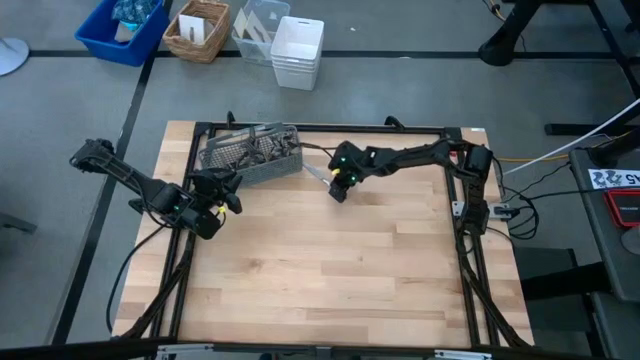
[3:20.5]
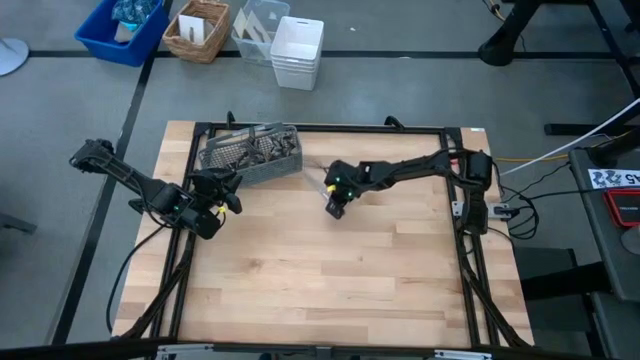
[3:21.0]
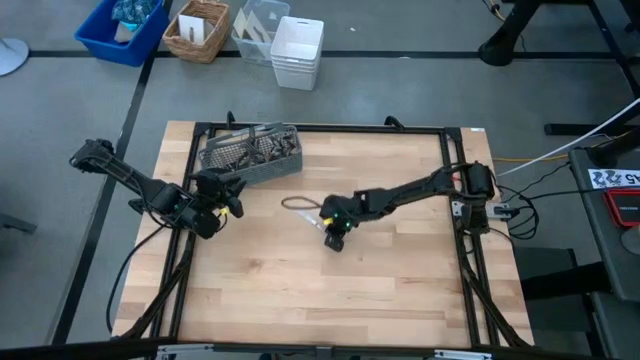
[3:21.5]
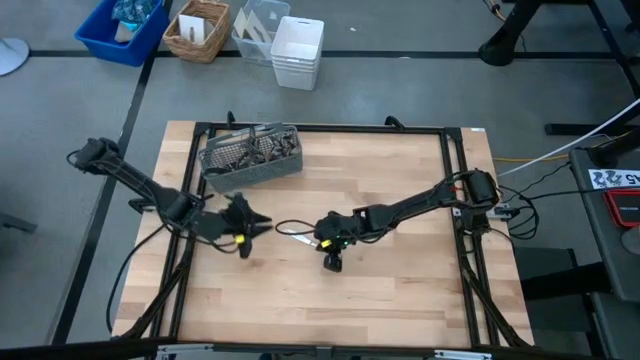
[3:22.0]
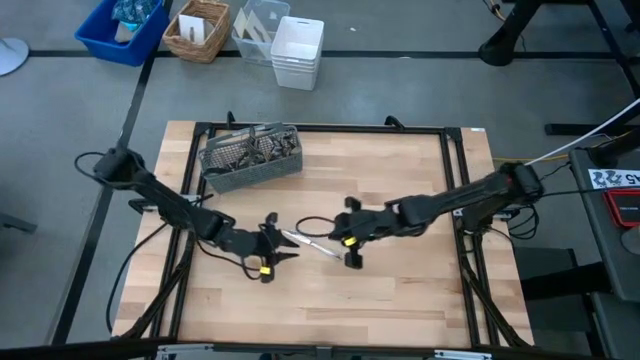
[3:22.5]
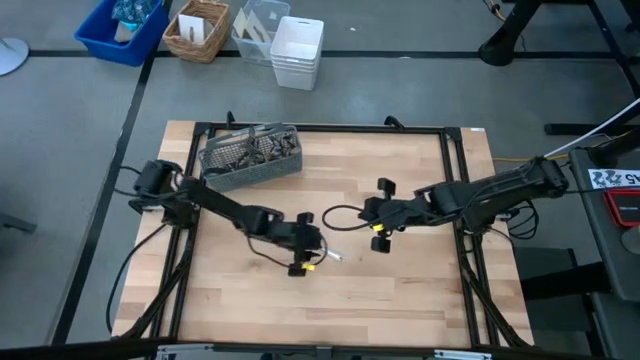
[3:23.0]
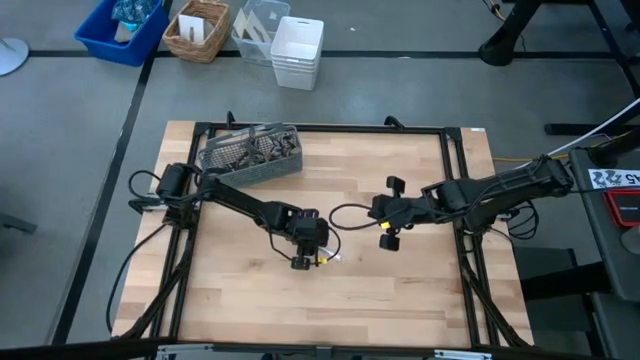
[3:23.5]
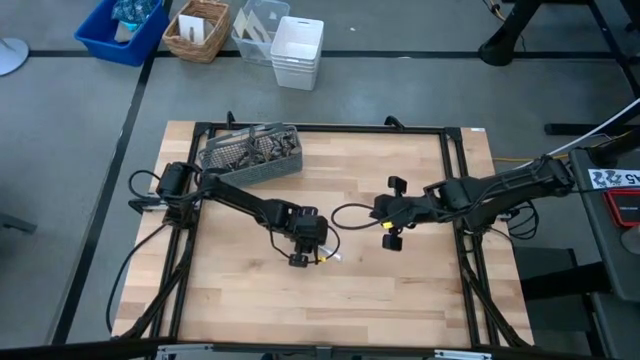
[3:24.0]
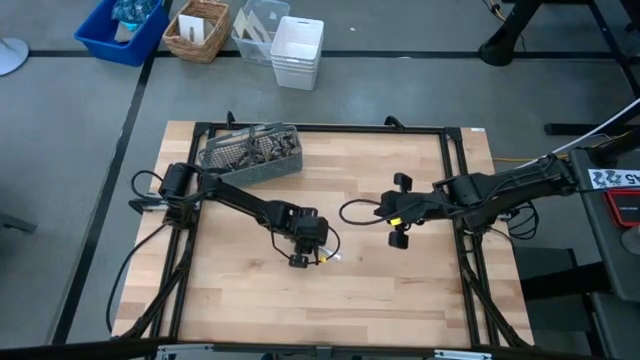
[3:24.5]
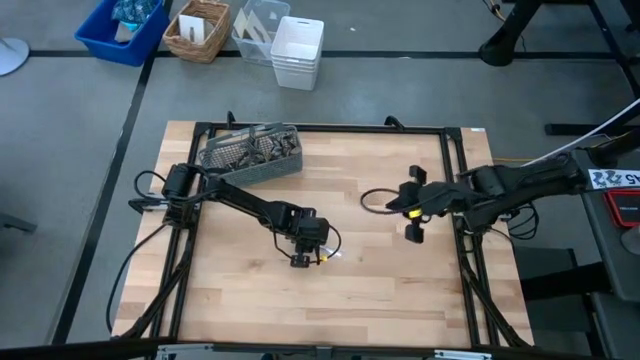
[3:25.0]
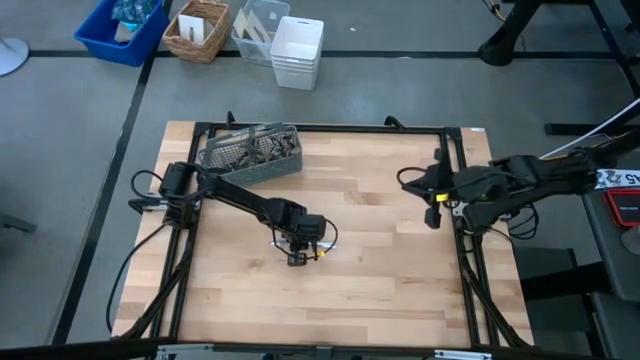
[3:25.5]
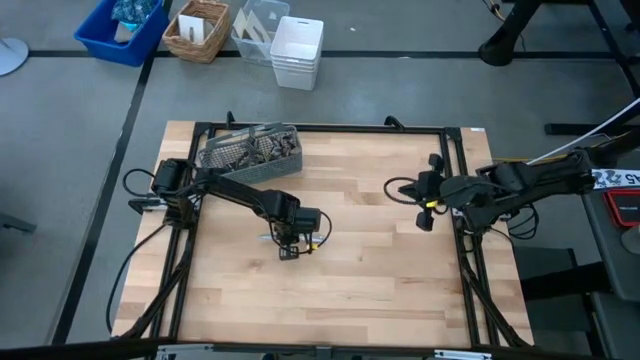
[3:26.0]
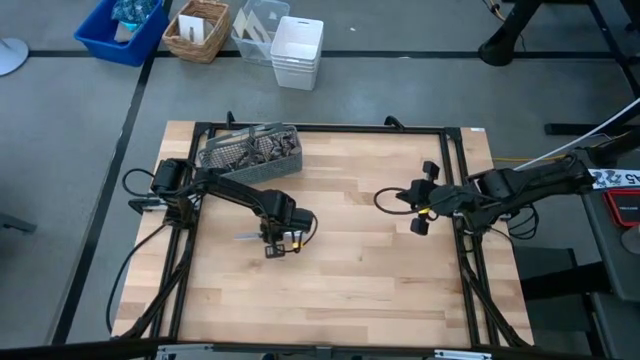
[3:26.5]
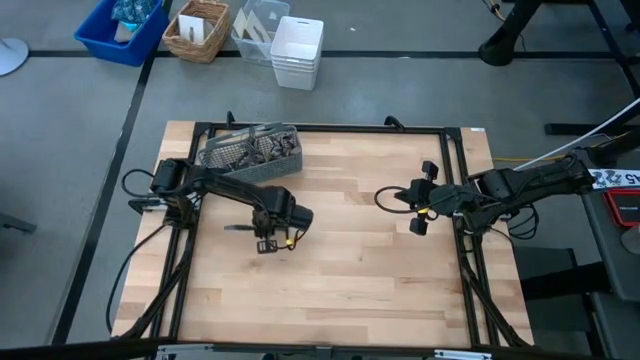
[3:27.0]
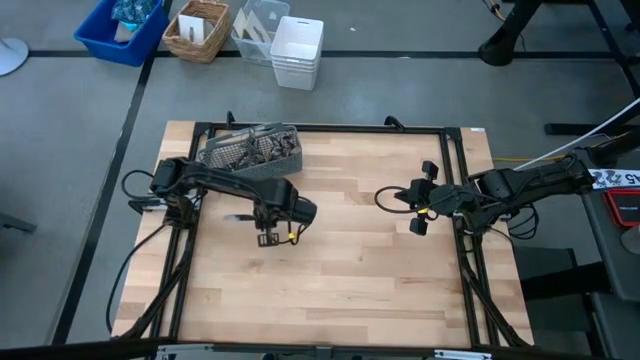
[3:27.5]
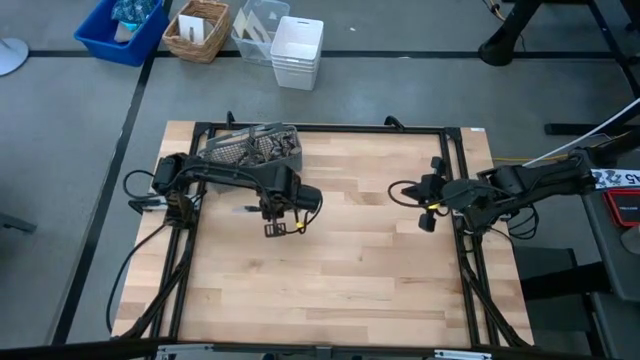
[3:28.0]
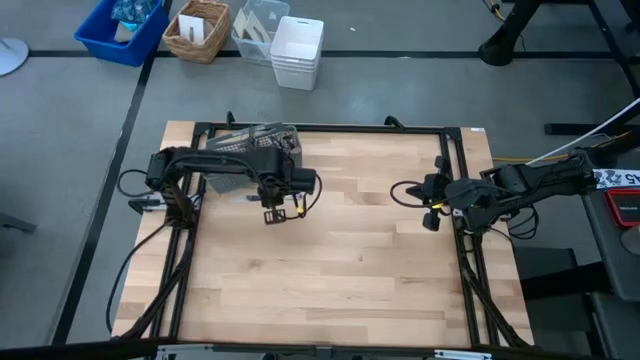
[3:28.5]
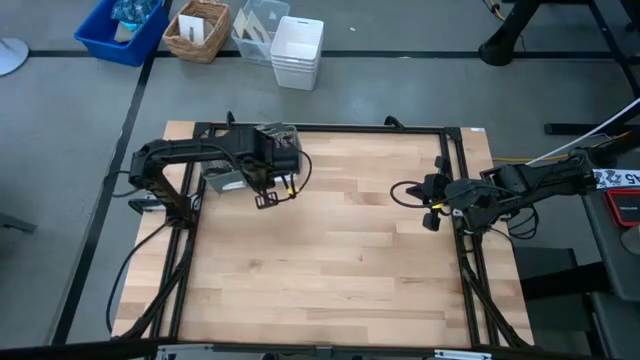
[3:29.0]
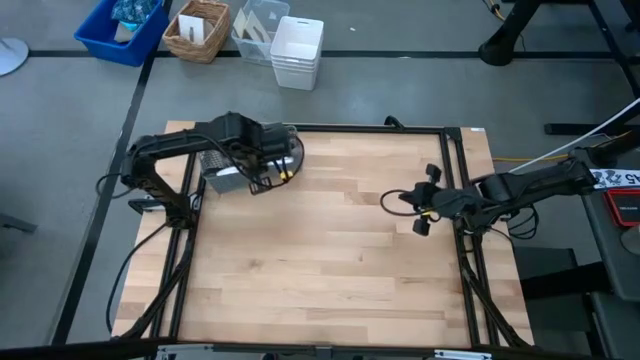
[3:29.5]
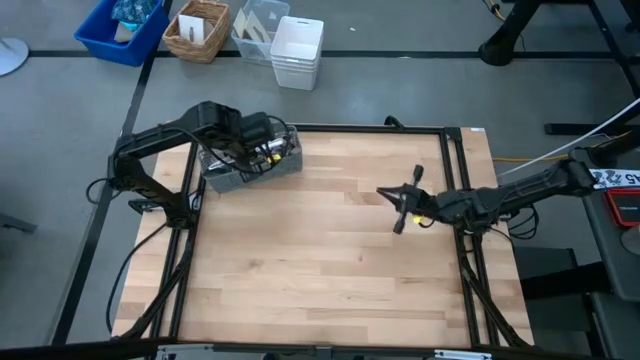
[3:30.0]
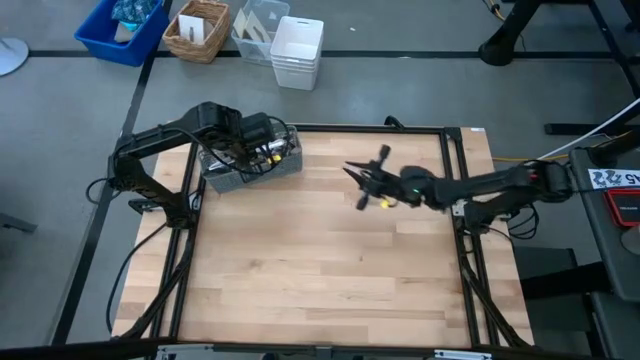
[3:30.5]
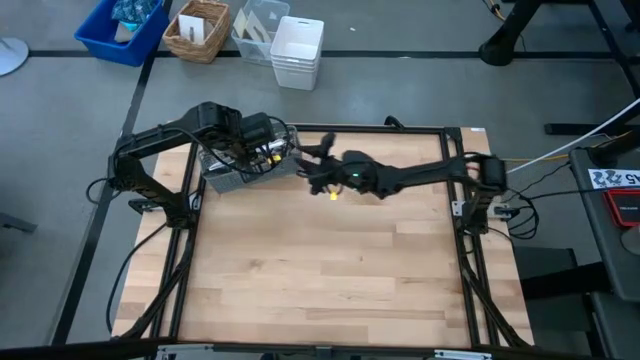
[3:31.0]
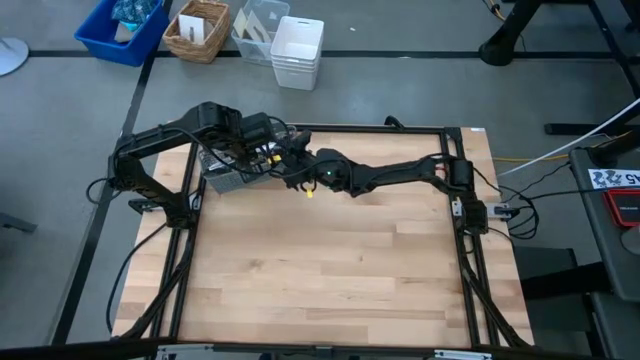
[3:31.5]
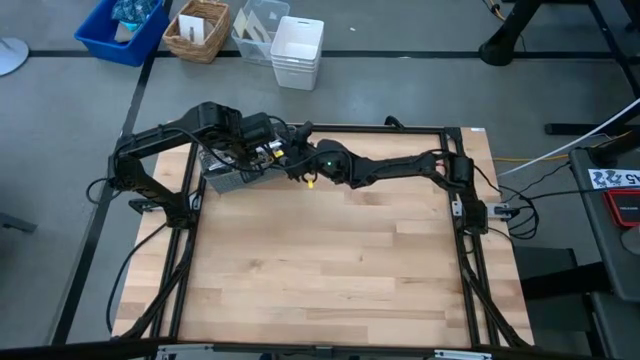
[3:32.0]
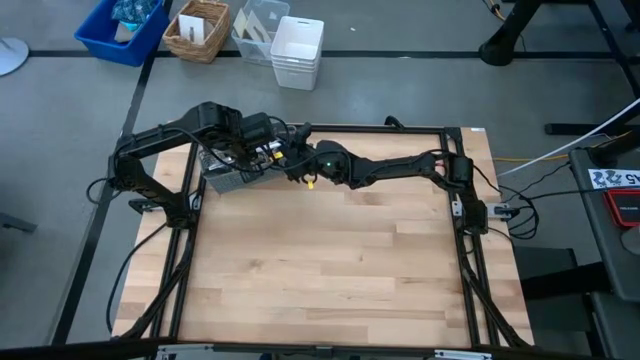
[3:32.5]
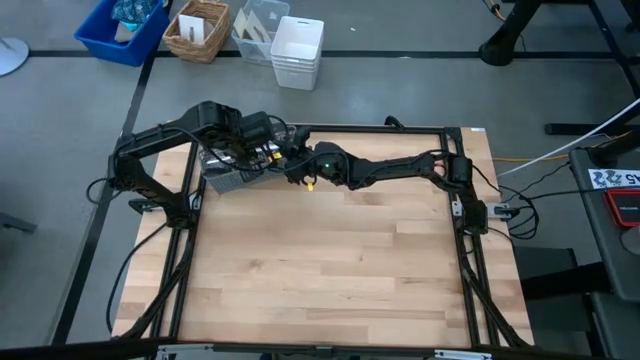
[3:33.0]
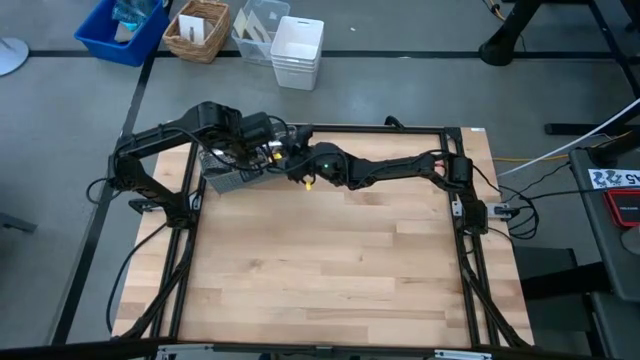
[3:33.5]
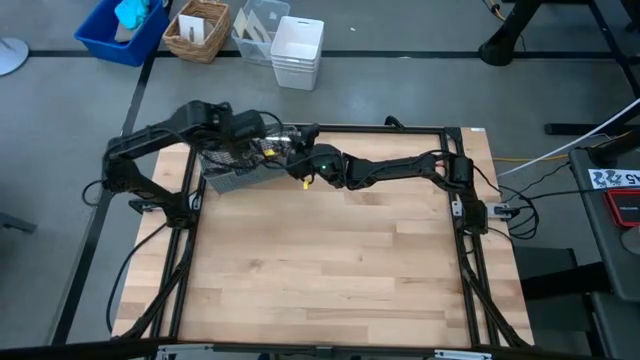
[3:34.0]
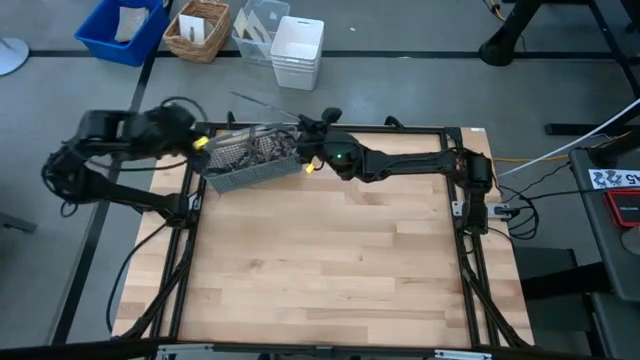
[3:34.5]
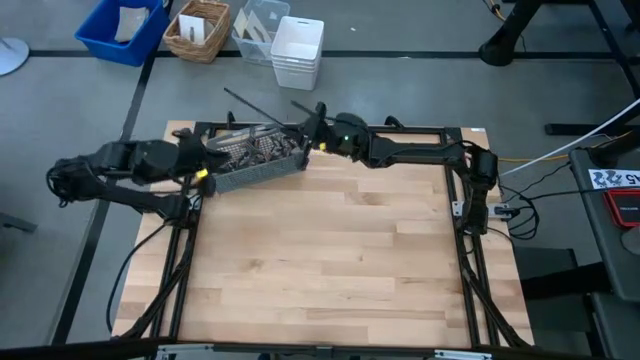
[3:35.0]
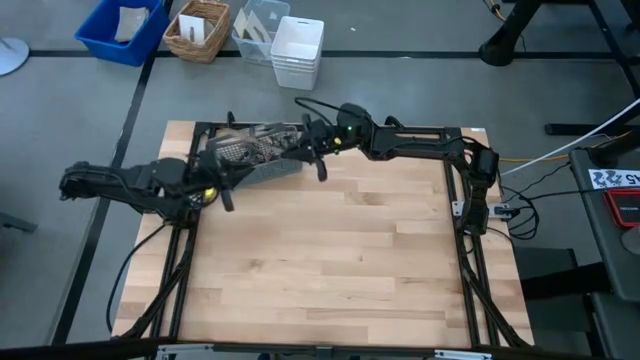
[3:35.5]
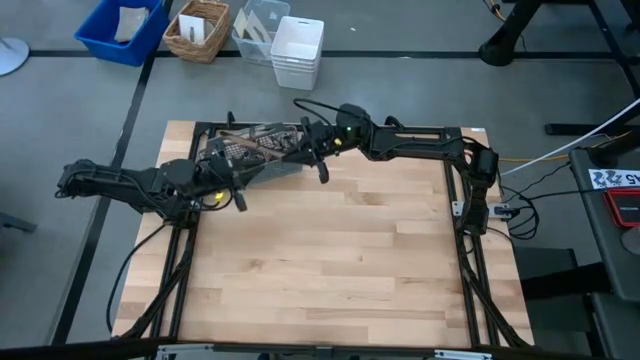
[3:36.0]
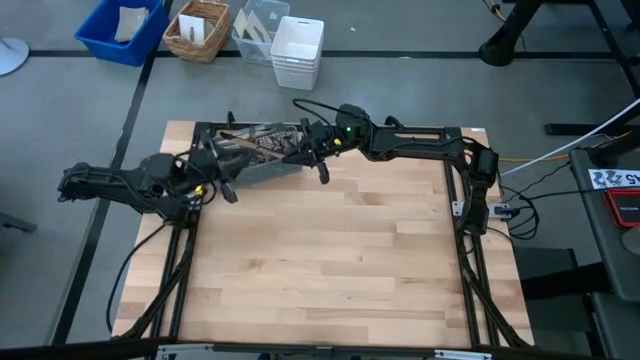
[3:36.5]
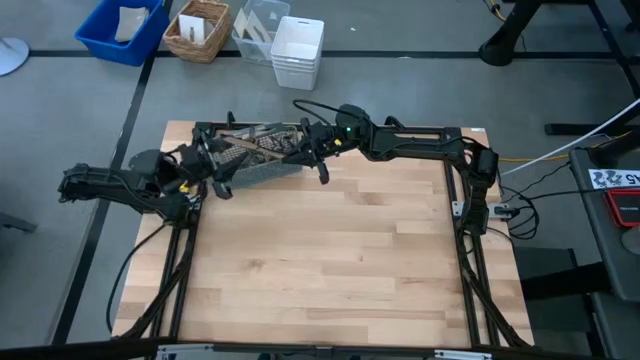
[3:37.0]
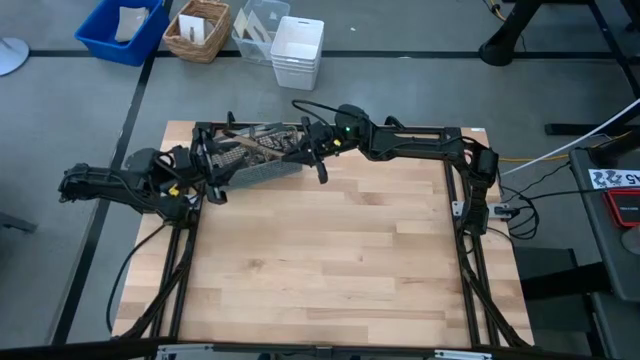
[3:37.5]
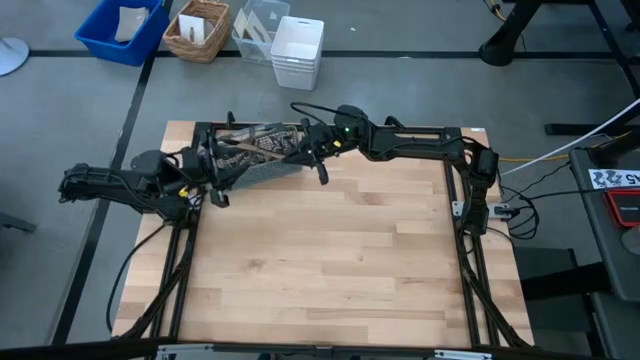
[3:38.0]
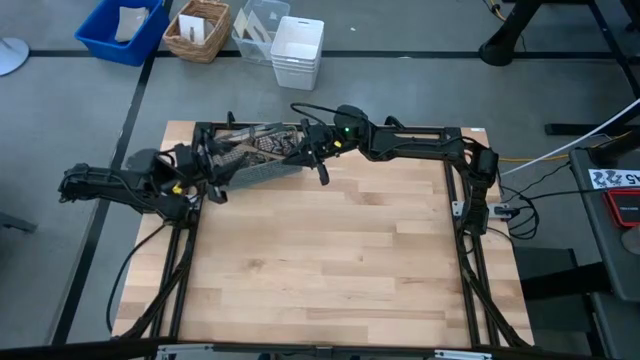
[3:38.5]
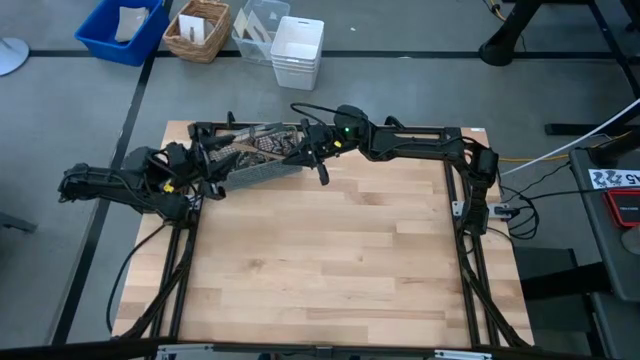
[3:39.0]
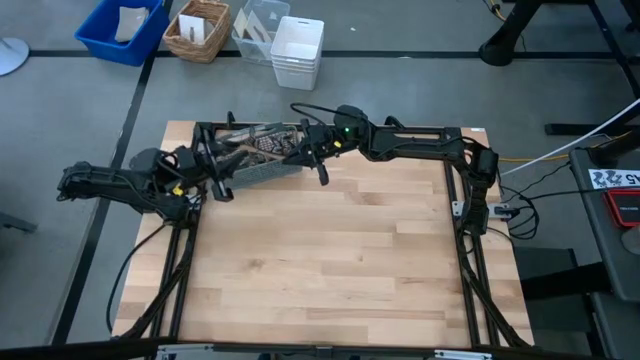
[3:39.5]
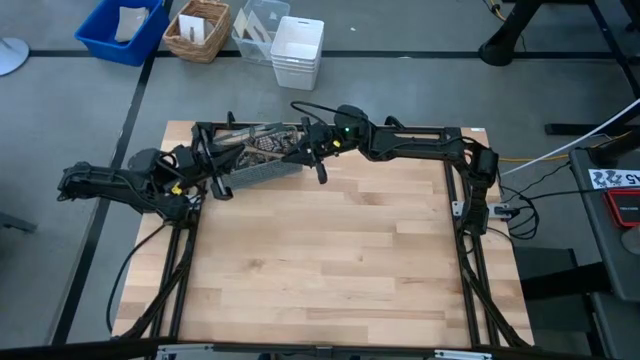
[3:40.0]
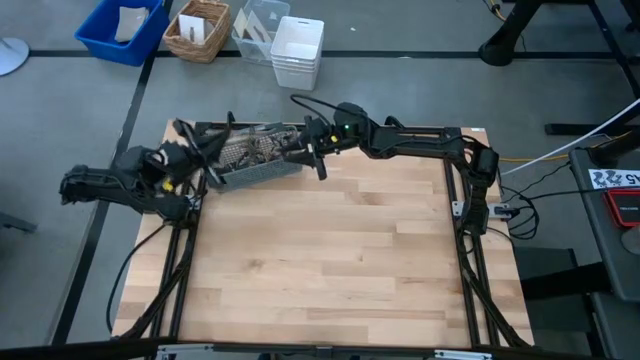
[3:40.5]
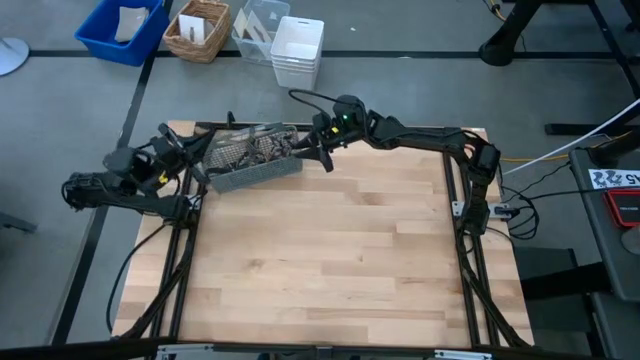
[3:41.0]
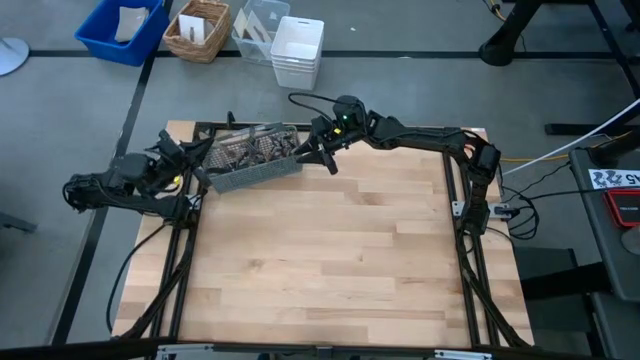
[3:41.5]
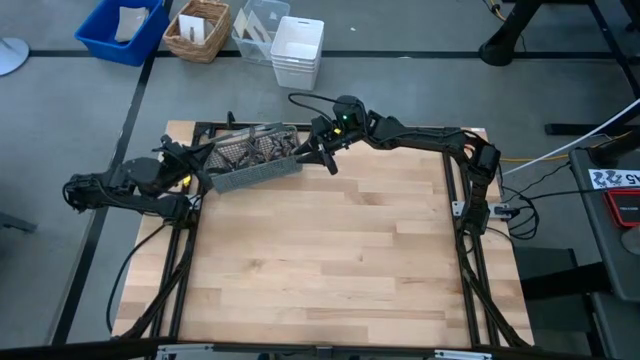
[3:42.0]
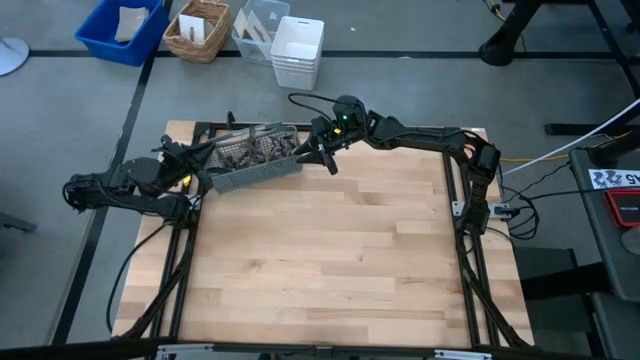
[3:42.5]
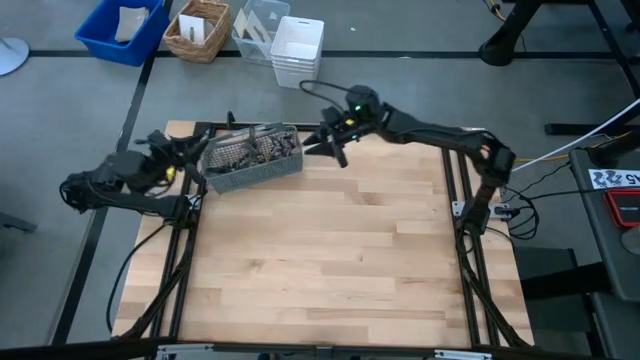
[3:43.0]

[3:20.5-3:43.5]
Task: Sort silverware
Put the silver table knife into the silverware rack
